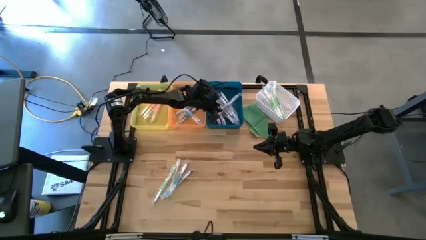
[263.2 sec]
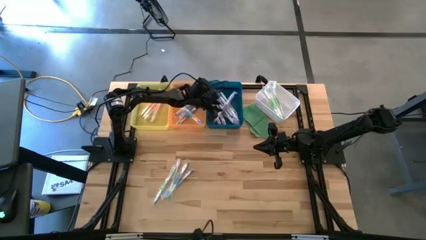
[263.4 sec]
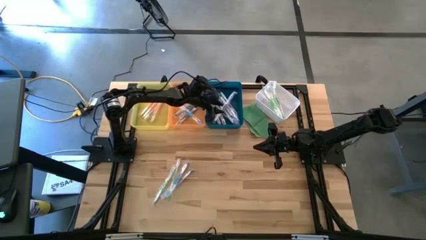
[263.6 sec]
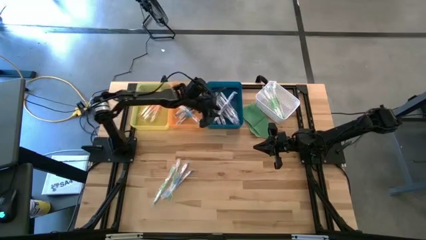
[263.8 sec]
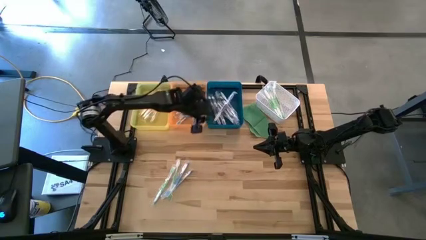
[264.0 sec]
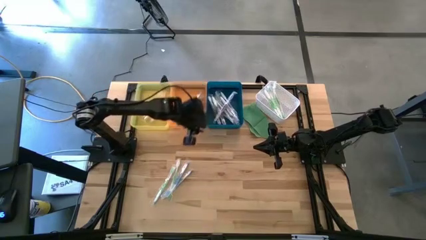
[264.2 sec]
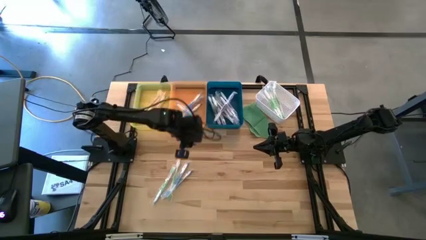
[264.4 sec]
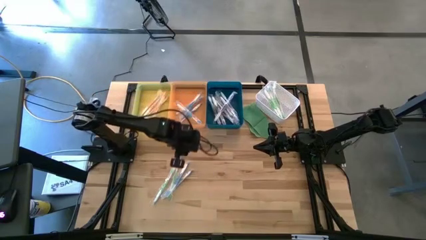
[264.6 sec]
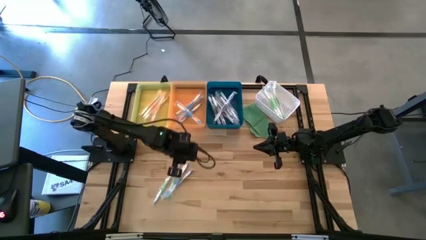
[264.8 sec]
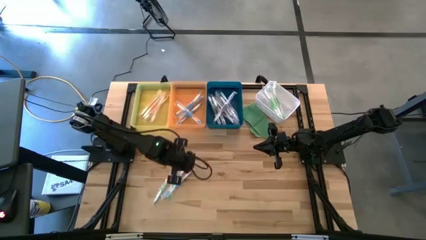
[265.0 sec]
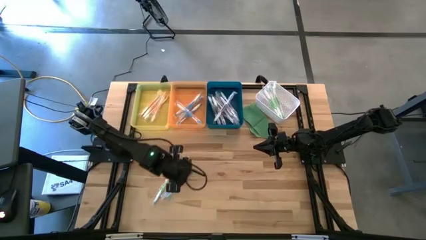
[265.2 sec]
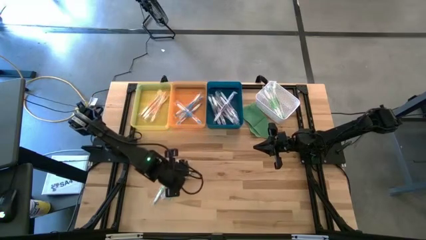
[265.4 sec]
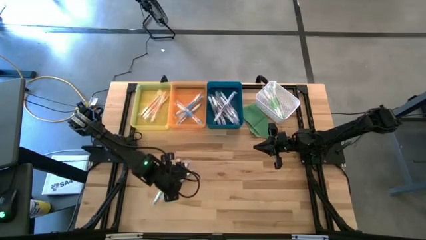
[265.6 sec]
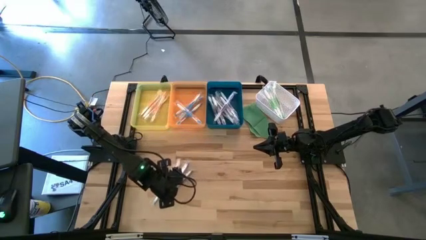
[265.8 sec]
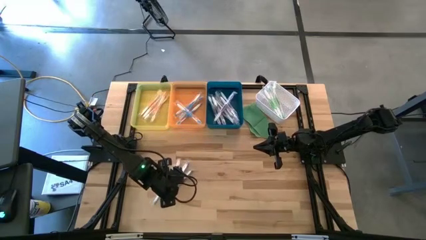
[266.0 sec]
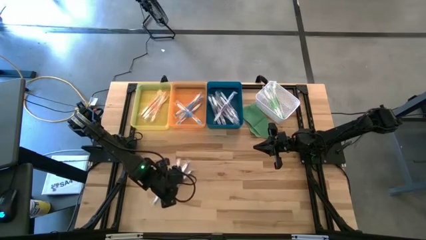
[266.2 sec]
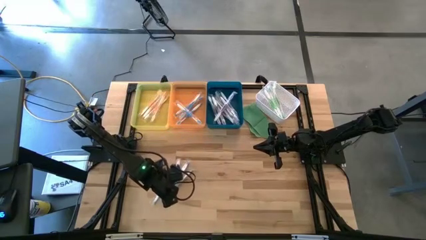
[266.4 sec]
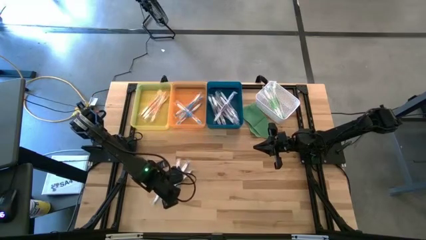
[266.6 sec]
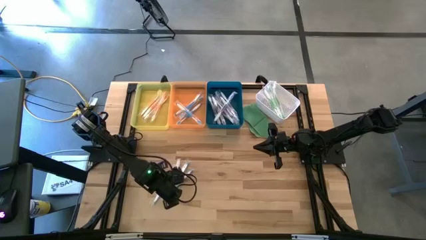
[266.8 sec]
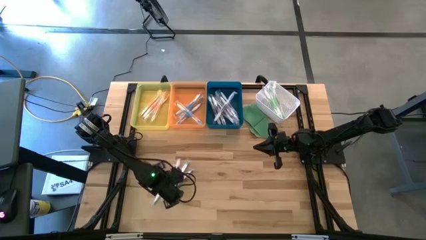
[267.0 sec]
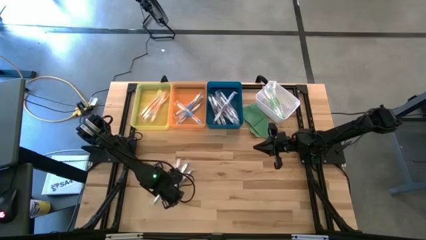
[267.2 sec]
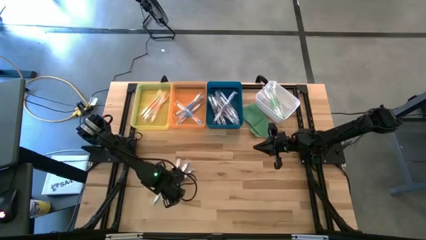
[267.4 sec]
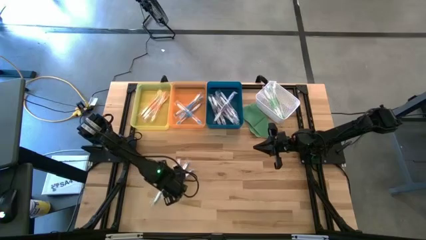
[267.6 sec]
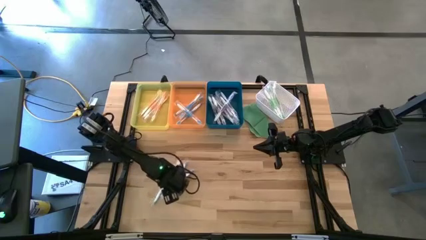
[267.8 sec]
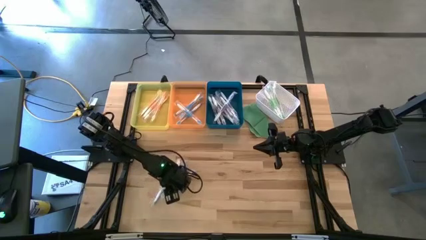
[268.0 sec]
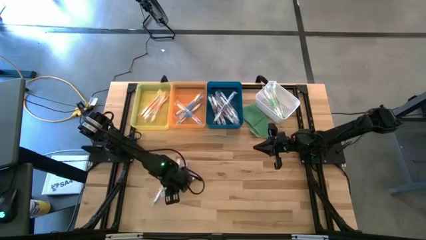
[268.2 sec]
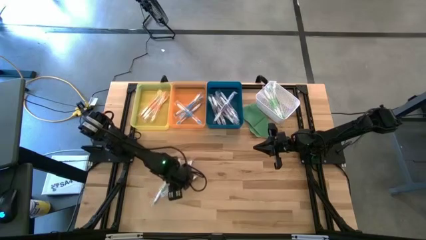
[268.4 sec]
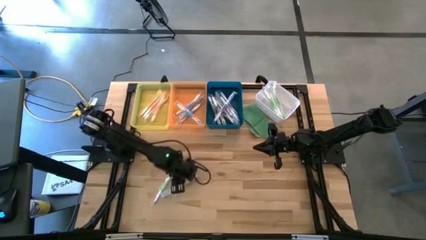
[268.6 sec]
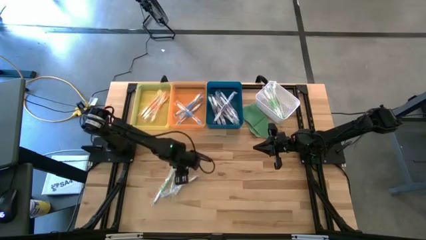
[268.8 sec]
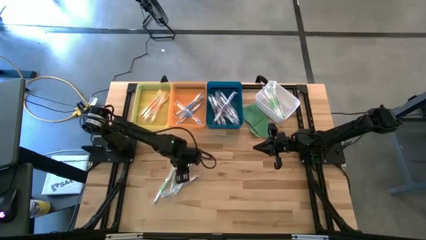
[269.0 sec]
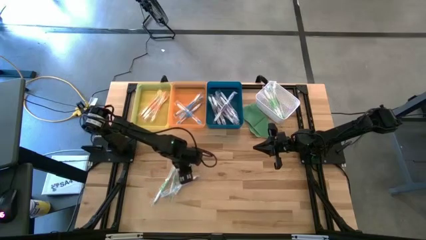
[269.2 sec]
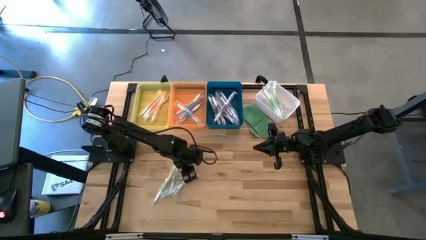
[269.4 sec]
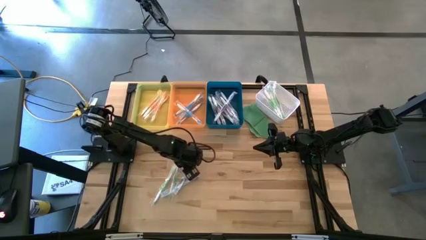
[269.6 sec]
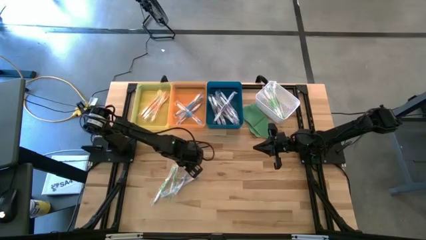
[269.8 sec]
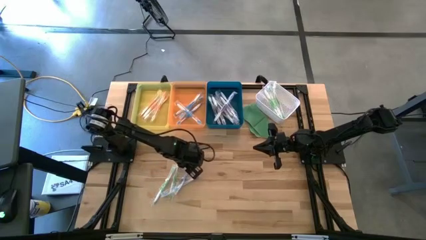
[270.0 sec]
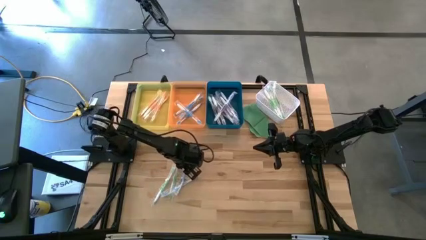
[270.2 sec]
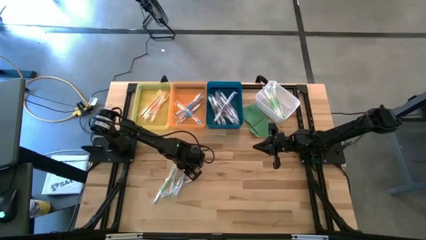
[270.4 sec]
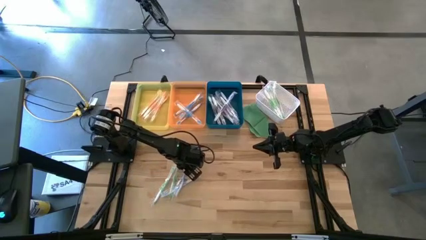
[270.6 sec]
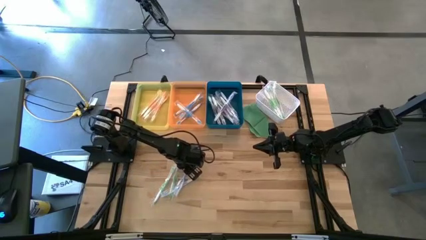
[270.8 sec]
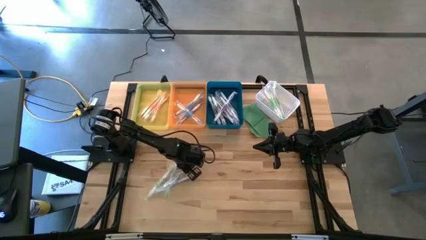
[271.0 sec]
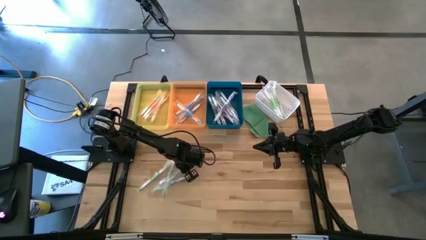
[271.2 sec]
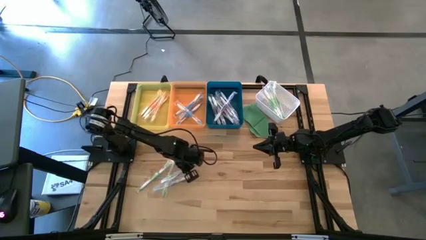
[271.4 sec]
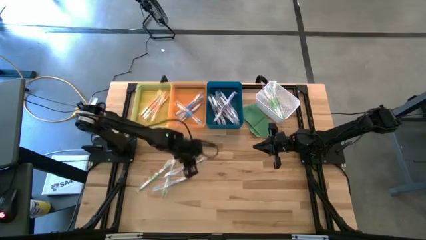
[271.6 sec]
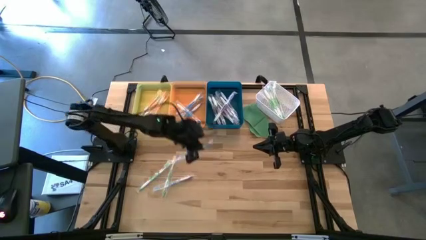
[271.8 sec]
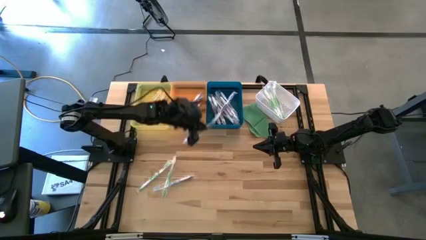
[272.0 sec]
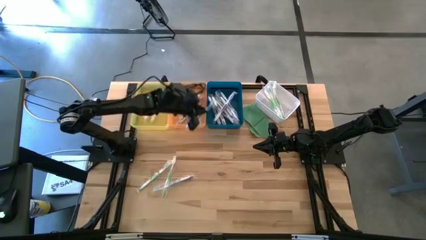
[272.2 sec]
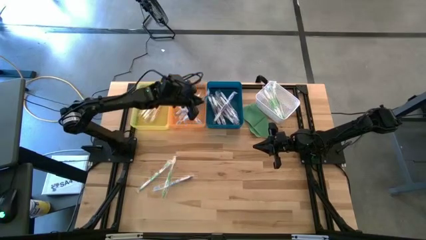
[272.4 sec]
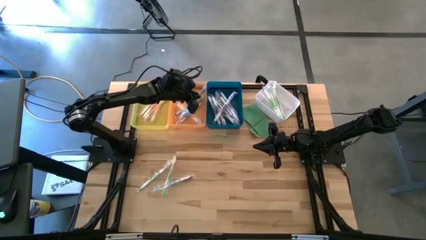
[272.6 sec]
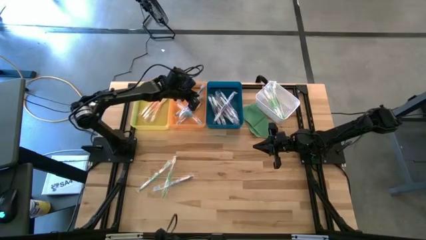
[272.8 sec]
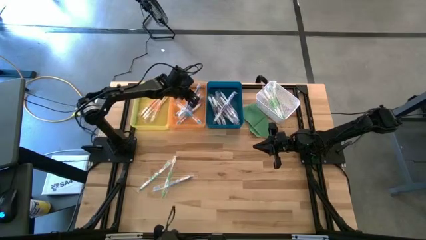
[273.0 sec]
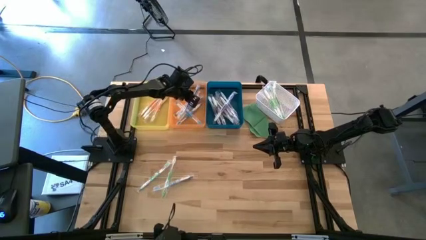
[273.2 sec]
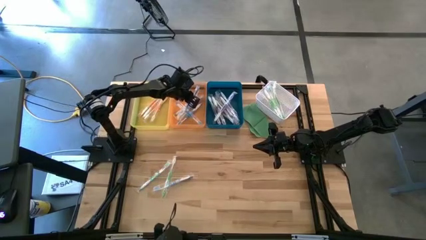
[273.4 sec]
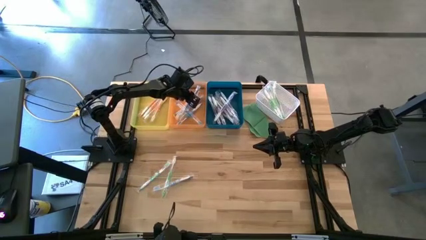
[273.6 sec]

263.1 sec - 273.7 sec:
Task: Pick & Place Toothbrushes
Put the blue toothbrush into the orange bin

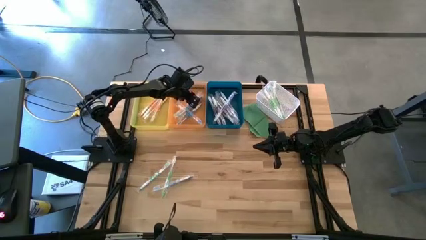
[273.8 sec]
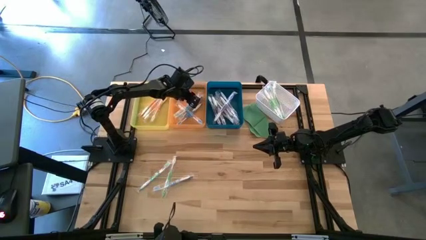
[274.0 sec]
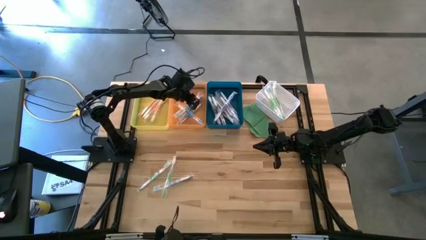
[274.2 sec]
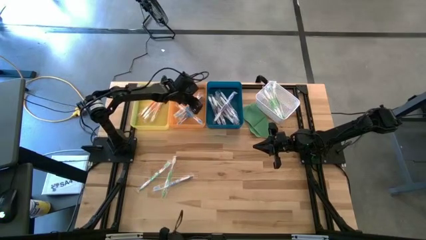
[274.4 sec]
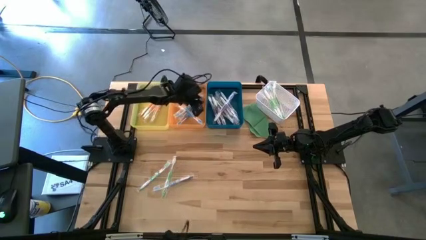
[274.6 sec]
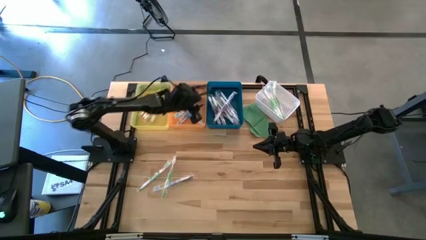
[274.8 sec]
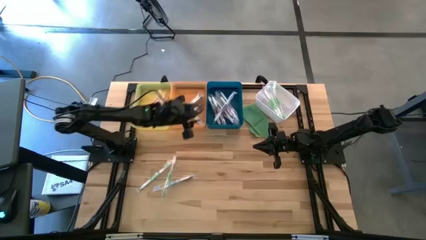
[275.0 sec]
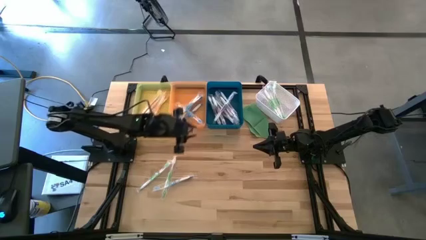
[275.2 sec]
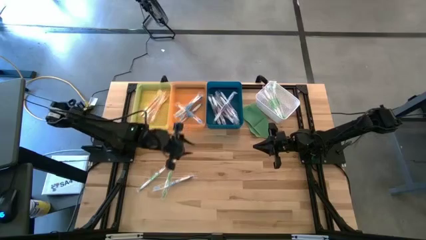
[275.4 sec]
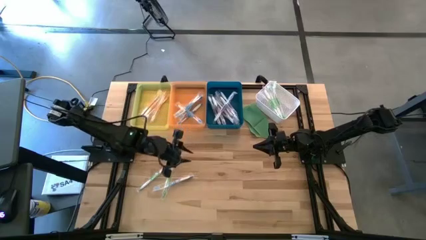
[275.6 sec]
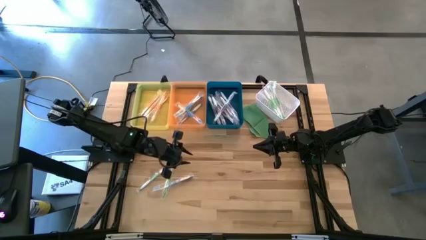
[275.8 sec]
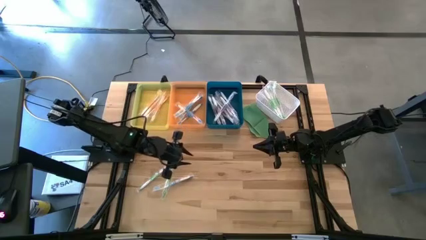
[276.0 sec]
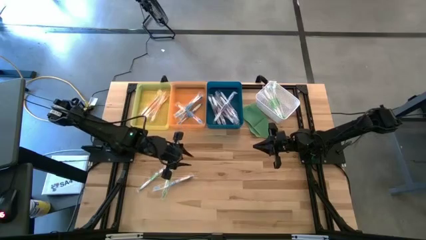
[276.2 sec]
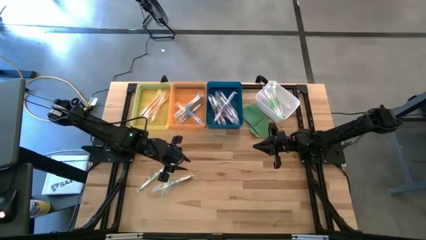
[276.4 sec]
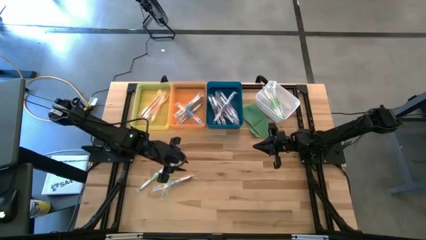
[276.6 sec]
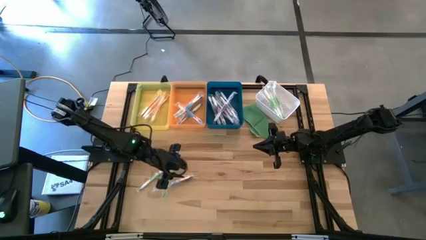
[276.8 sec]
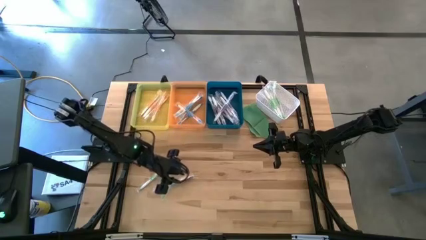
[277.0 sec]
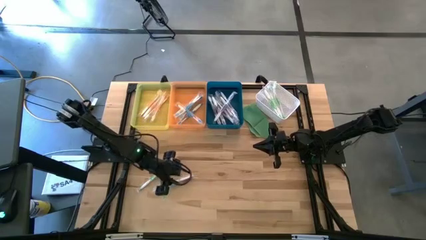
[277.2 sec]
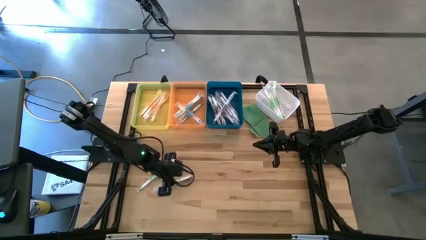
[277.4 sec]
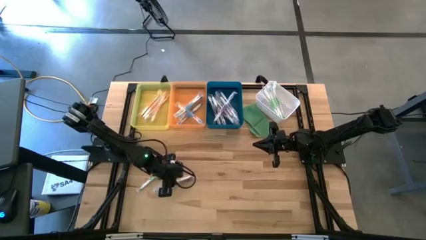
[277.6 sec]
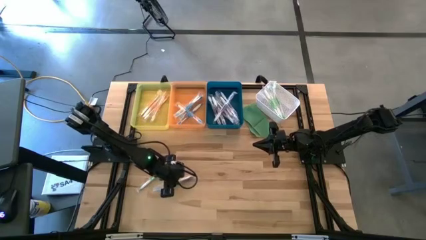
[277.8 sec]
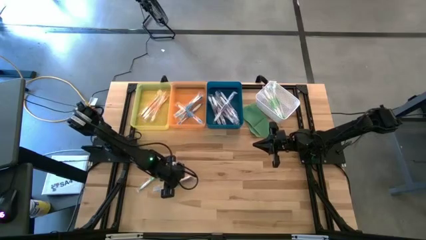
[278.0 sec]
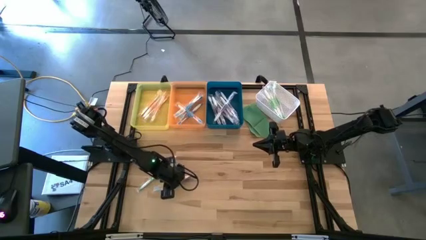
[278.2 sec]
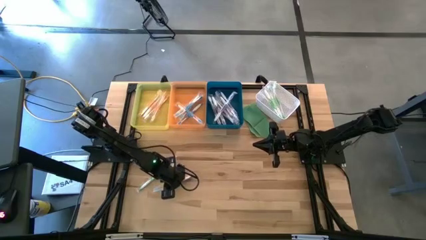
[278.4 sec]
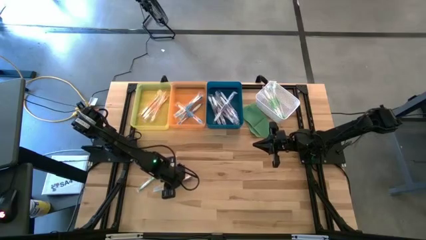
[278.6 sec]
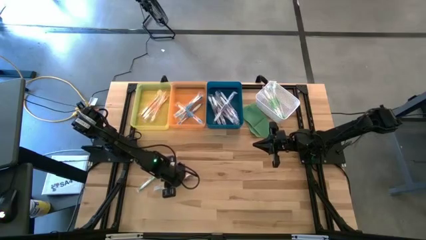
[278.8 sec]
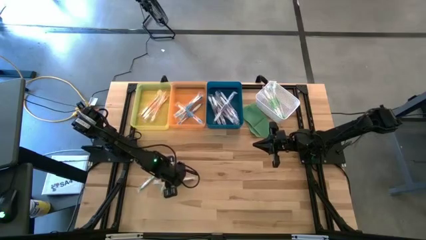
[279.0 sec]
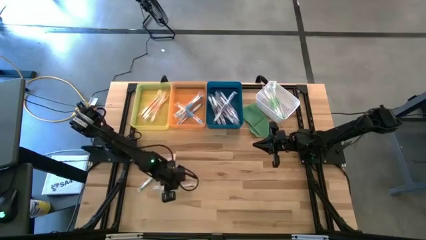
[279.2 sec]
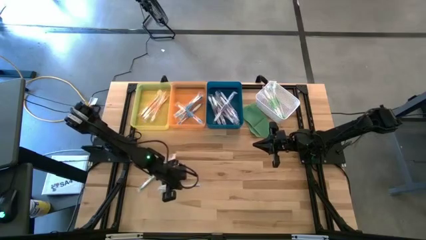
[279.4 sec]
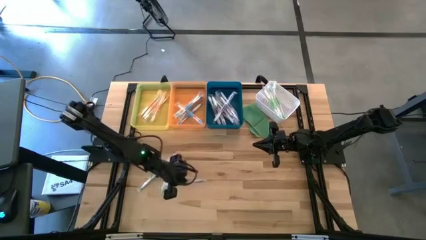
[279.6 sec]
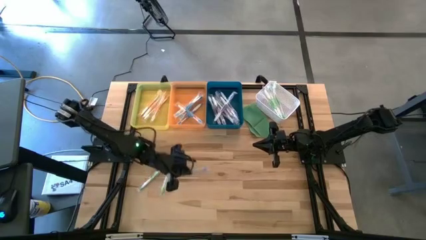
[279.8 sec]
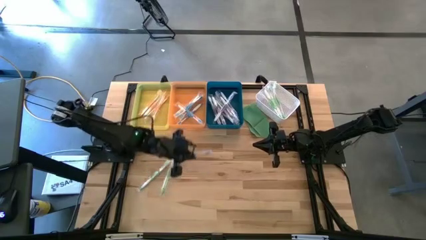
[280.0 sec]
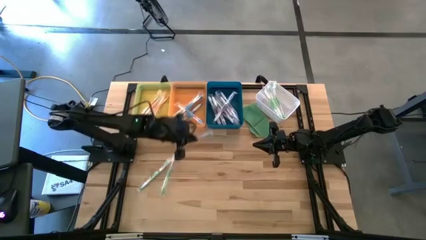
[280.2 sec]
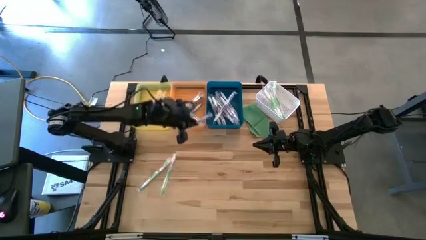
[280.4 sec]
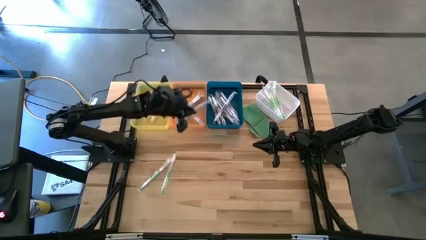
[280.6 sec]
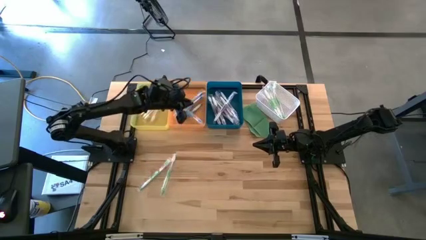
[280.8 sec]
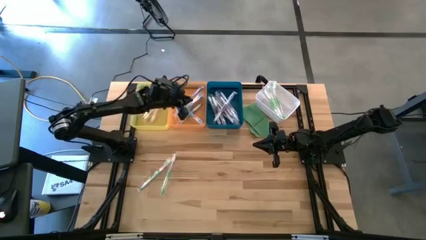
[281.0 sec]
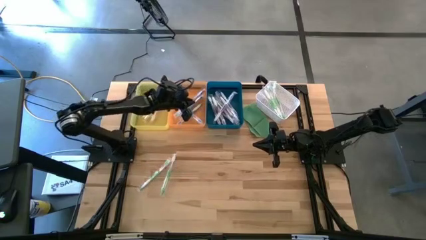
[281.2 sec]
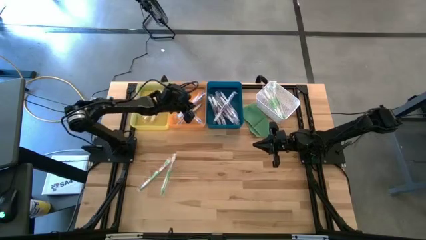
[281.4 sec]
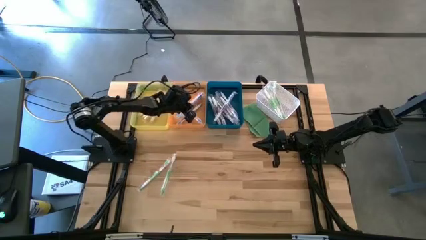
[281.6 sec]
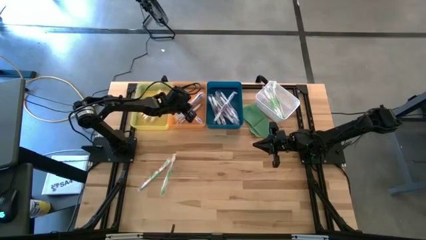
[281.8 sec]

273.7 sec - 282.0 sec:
Put the blue toothbrush into the orange bin
